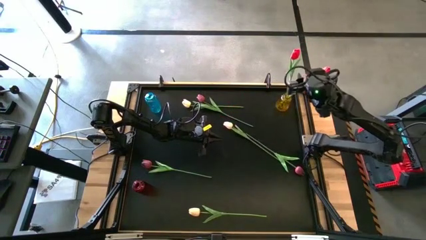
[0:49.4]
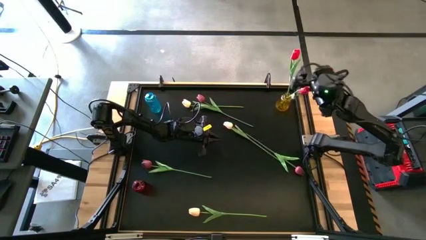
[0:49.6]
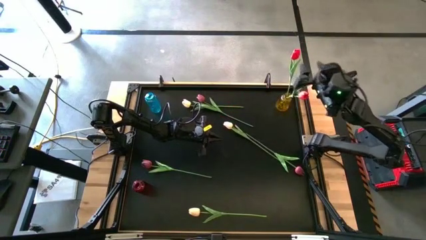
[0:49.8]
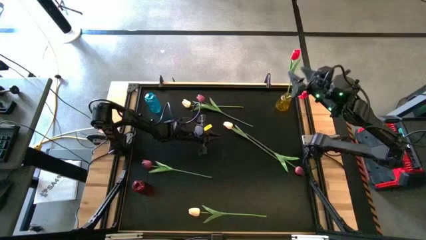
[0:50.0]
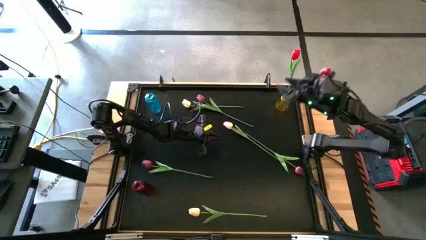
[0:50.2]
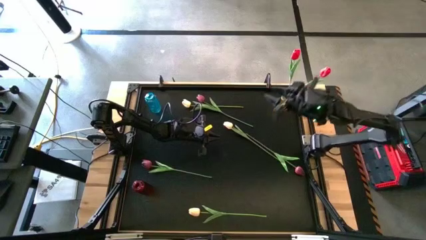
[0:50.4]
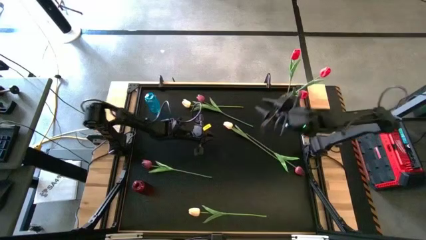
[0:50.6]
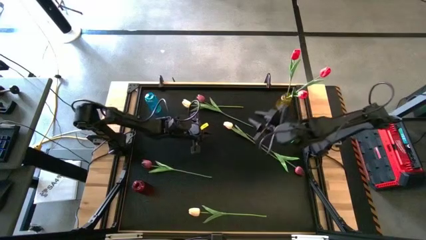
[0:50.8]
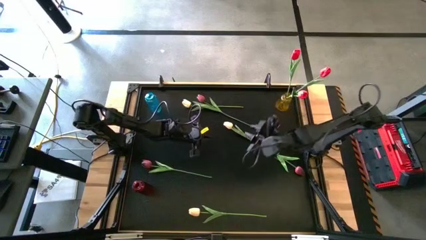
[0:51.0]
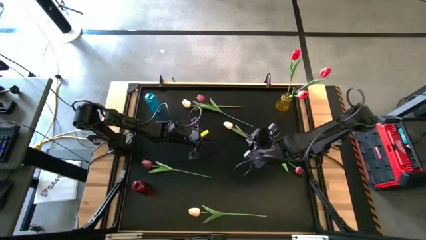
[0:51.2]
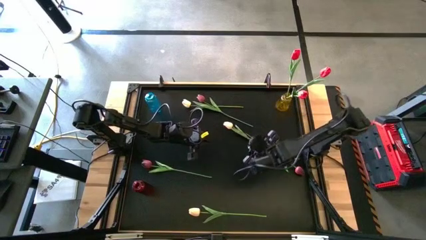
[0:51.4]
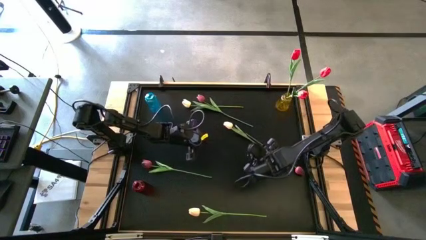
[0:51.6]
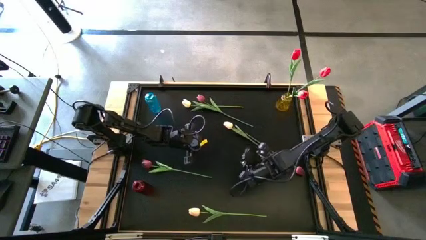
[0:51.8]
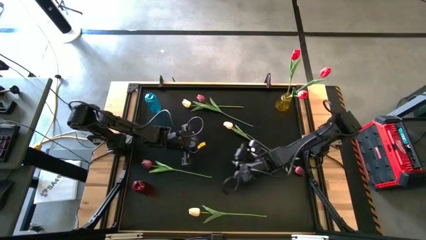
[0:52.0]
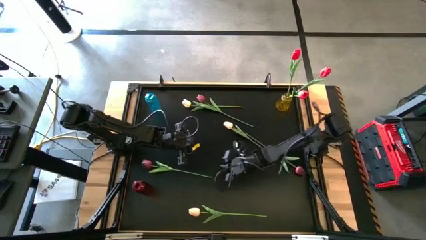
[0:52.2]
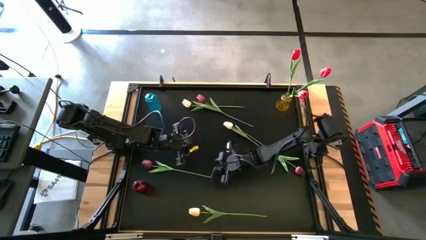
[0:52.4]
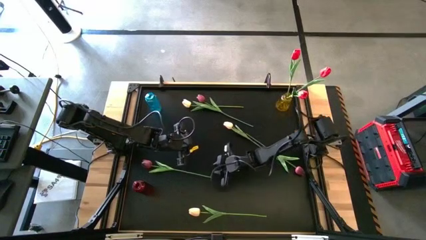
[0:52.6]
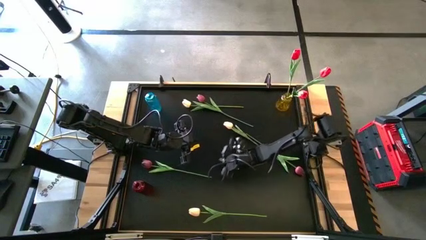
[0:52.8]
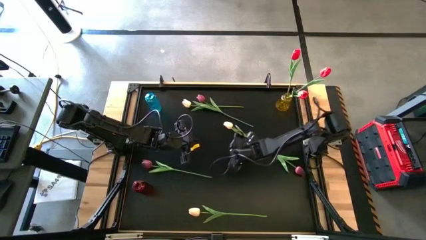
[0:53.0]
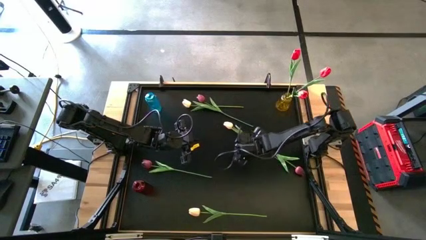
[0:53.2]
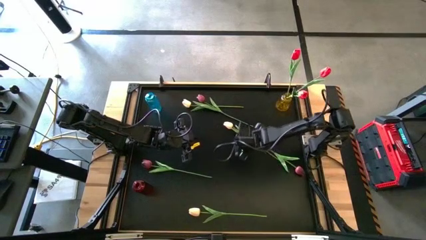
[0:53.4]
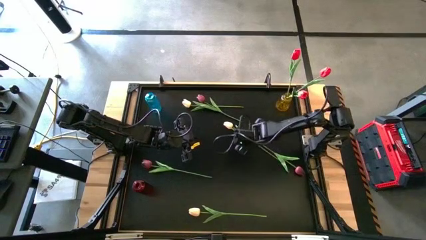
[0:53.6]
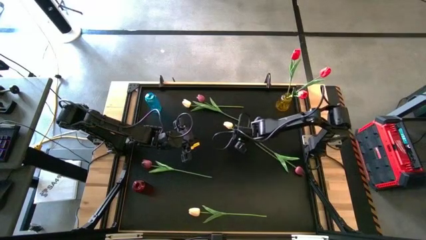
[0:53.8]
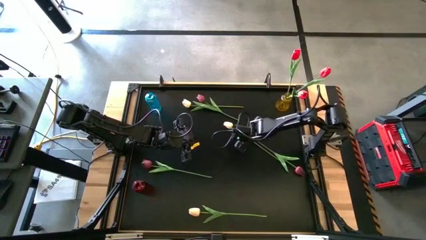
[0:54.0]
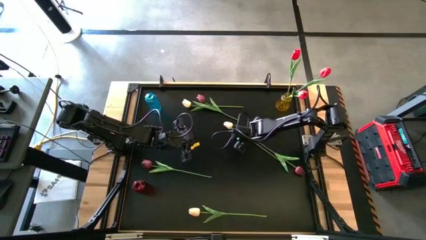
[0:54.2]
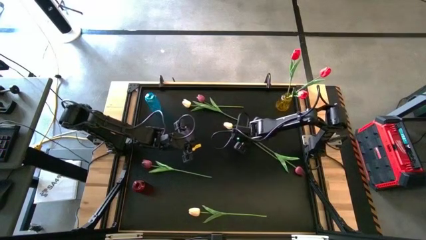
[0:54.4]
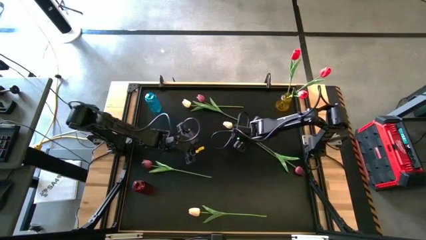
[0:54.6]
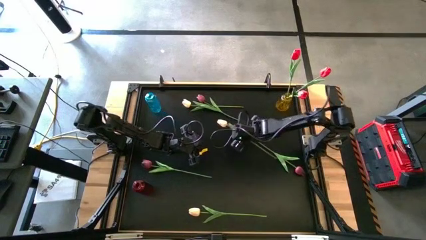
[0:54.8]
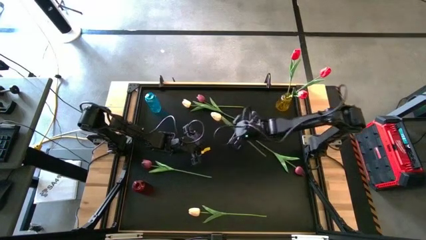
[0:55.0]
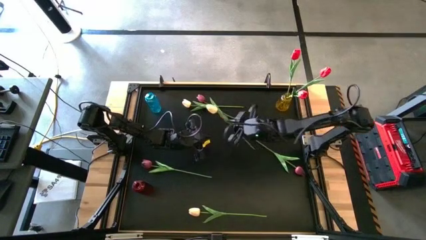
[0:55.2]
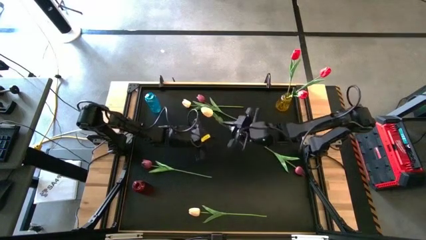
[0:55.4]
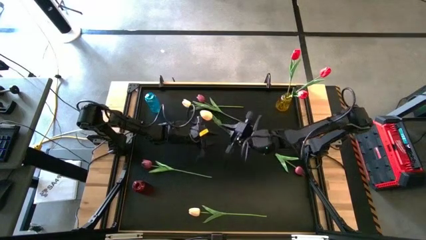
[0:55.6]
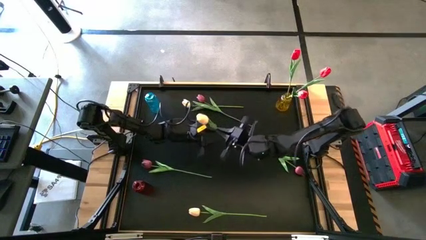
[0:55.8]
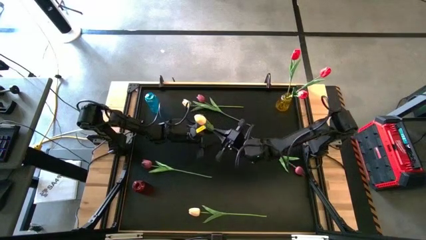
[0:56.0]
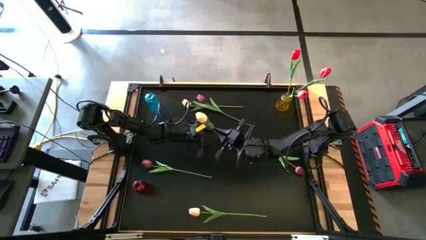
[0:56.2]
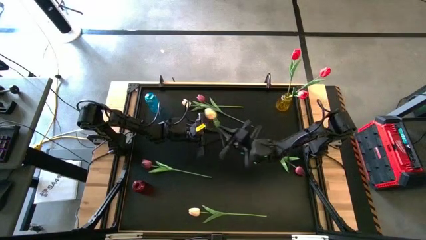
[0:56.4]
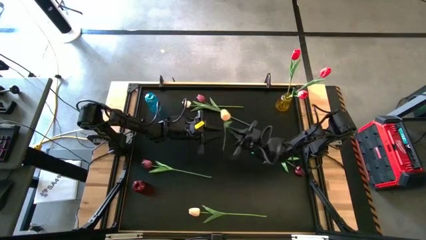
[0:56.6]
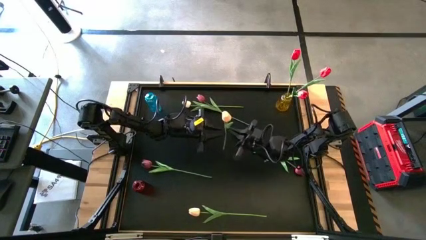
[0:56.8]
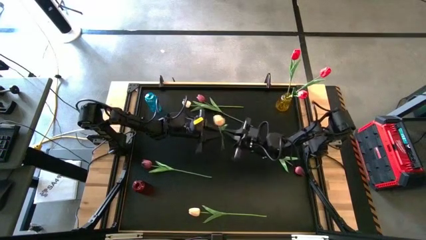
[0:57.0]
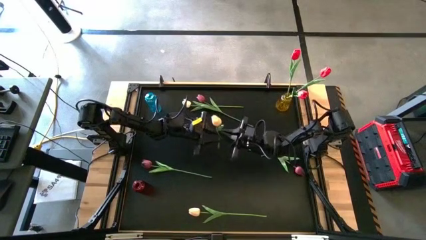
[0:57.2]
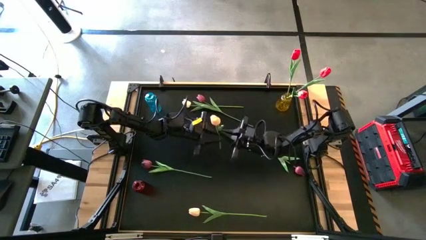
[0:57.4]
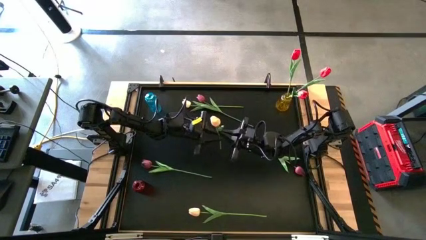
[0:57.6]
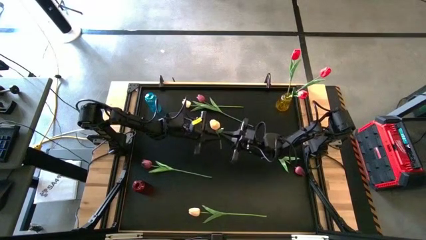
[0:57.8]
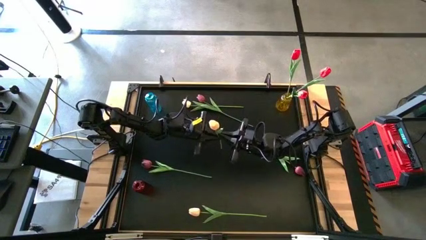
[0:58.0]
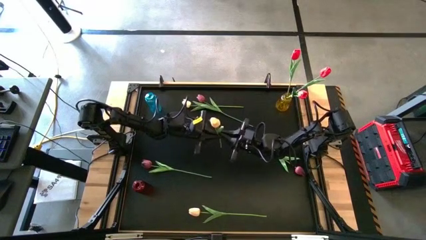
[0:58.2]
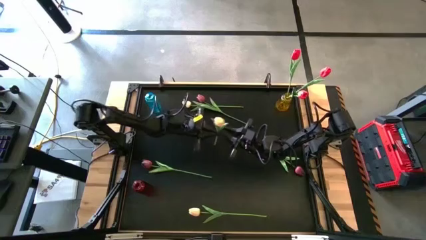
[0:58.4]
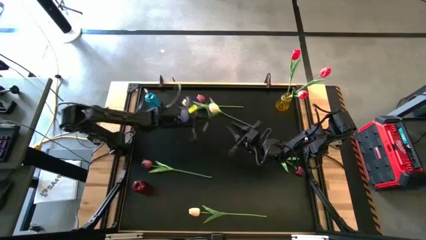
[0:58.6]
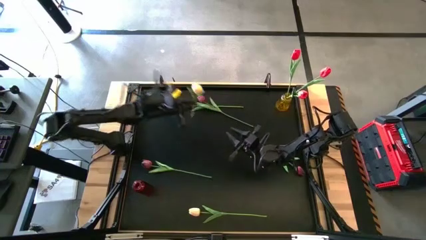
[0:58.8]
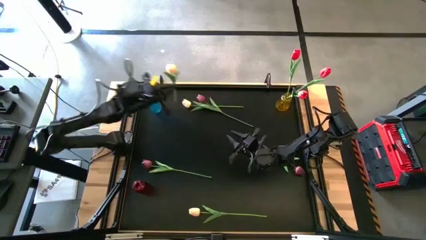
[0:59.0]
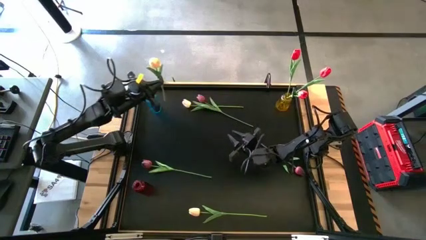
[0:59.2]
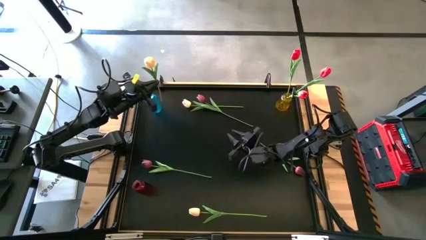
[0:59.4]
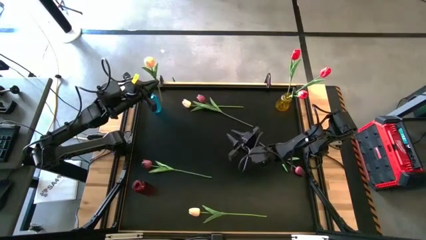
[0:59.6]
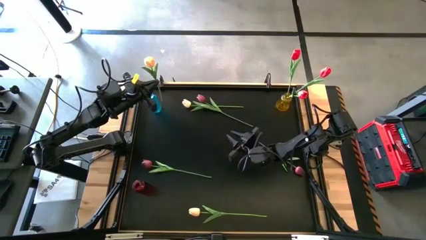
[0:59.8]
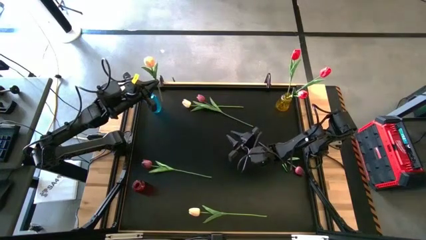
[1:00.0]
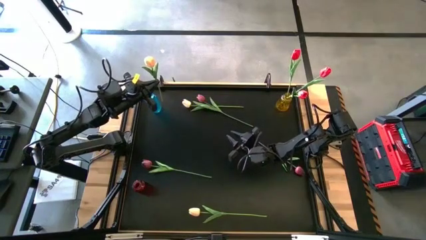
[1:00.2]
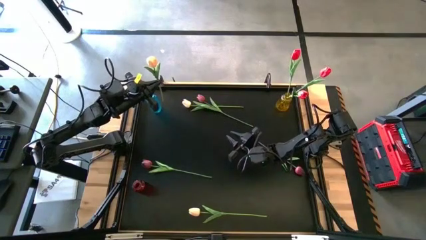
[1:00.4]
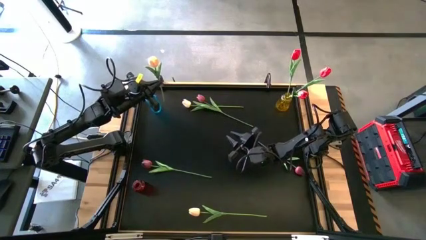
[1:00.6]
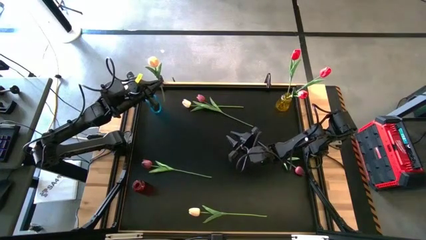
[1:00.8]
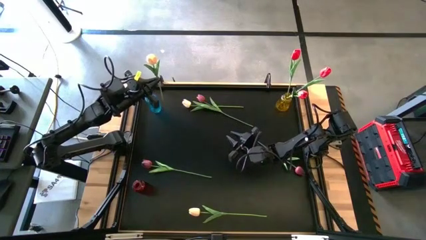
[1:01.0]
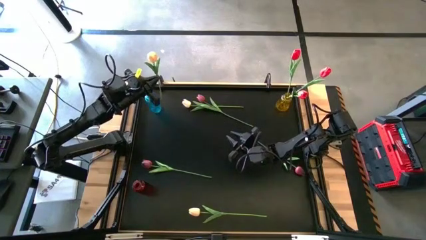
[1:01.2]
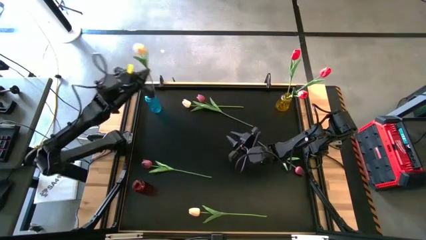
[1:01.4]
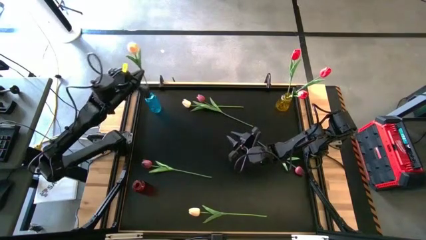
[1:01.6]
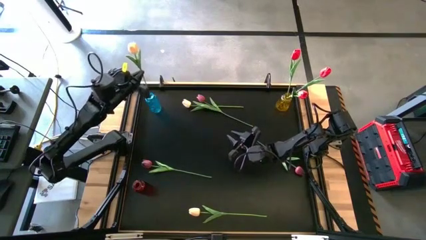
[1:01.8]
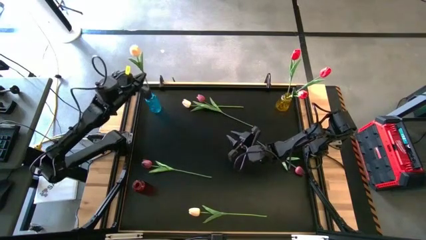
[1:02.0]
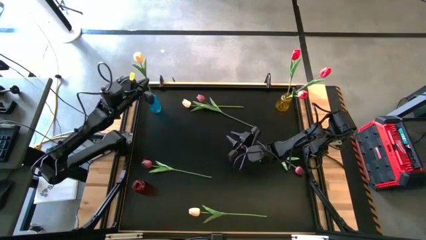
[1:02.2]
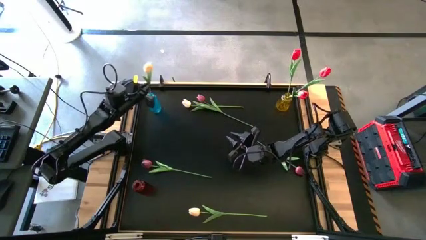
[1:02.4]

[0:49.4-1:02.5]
Task: Sort flowers into vase by color
Put the middle white tulip into the blue vase
